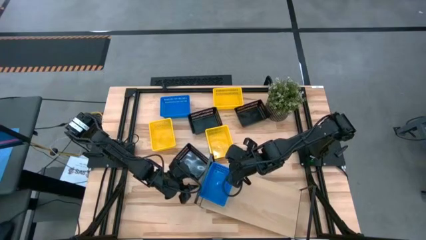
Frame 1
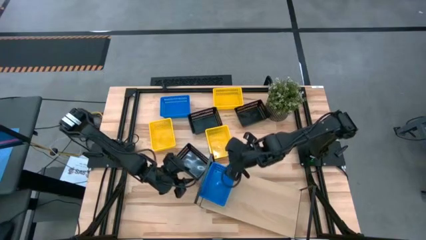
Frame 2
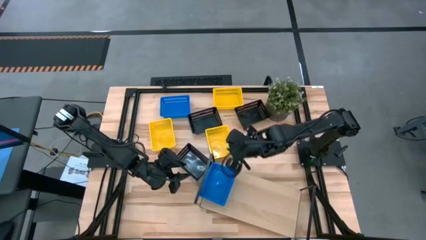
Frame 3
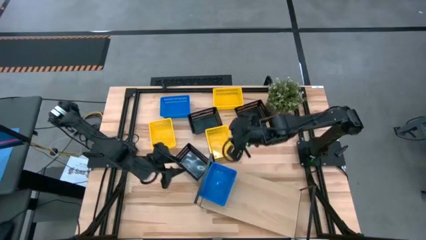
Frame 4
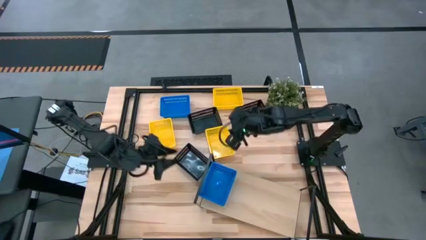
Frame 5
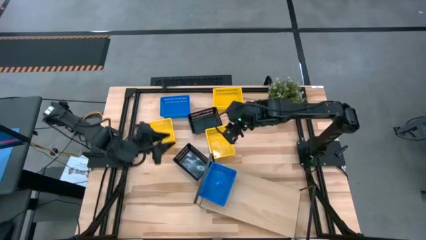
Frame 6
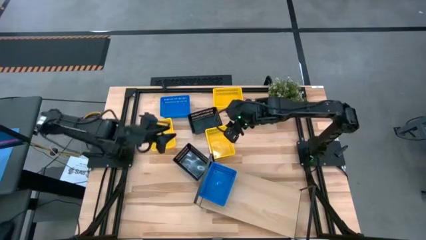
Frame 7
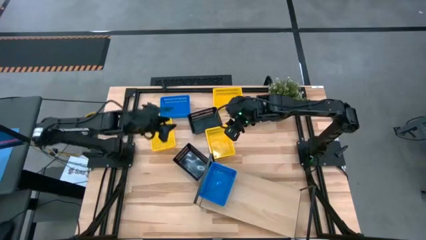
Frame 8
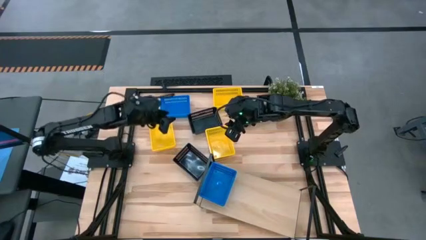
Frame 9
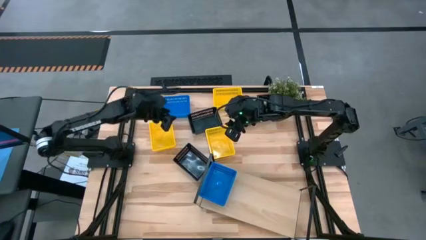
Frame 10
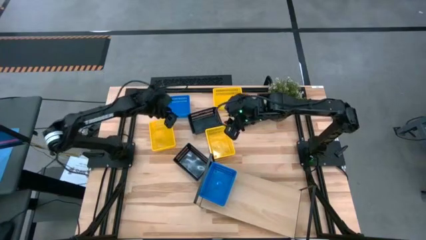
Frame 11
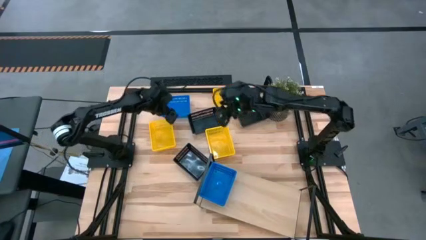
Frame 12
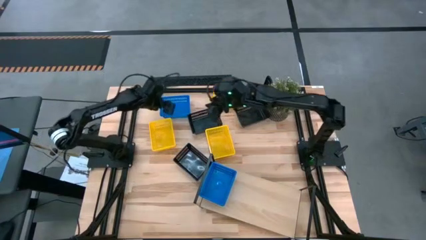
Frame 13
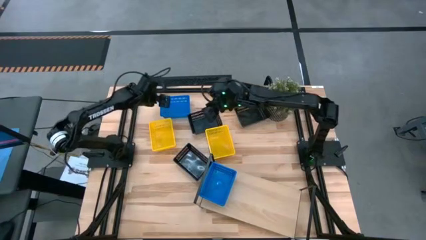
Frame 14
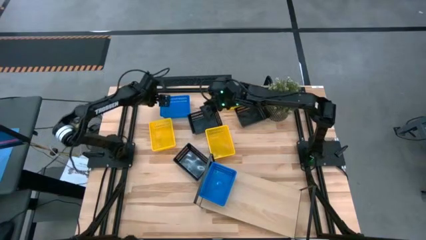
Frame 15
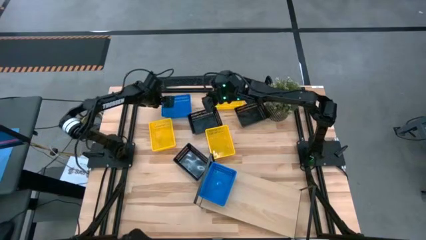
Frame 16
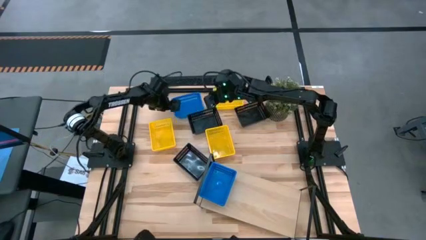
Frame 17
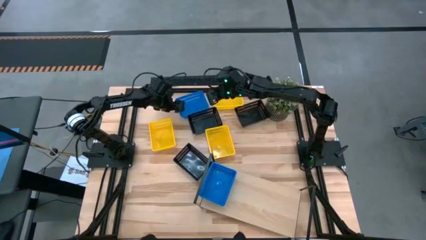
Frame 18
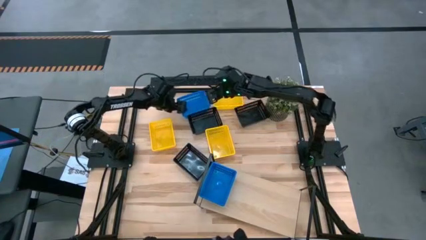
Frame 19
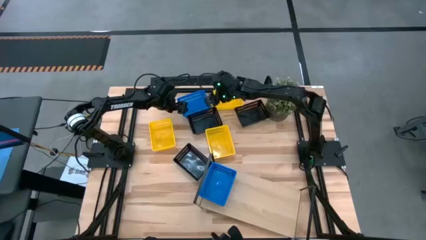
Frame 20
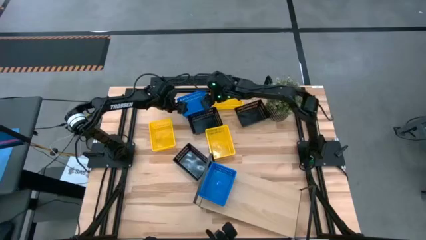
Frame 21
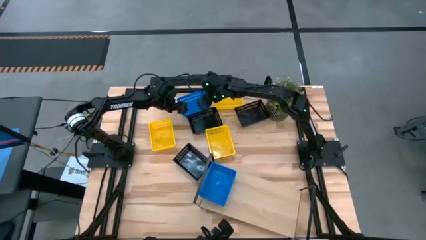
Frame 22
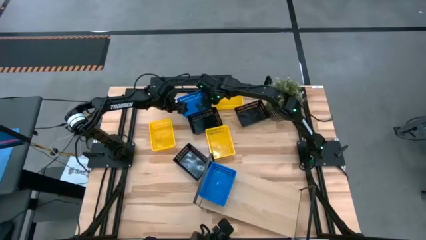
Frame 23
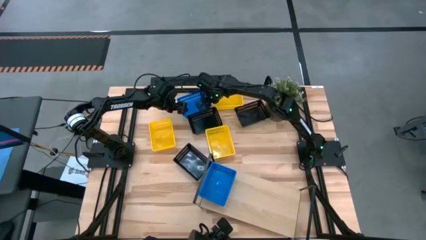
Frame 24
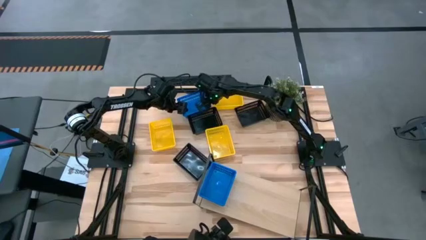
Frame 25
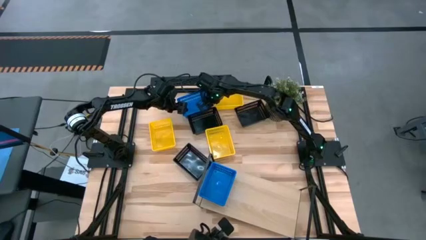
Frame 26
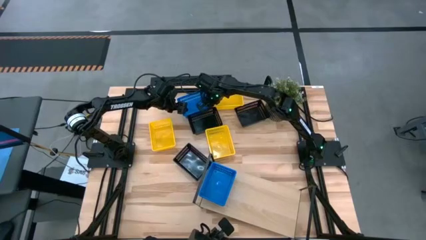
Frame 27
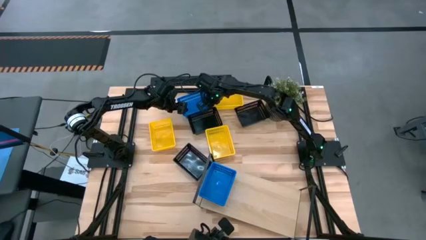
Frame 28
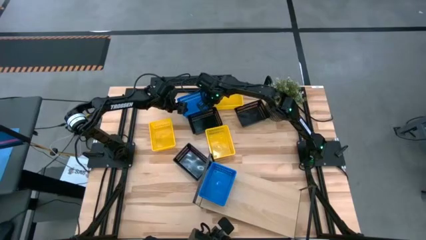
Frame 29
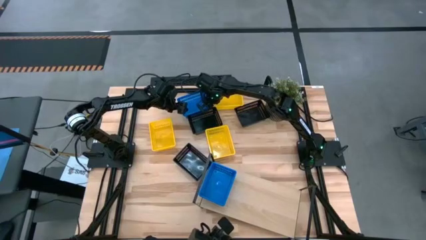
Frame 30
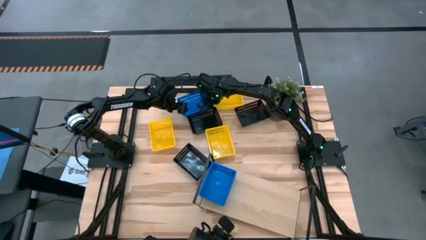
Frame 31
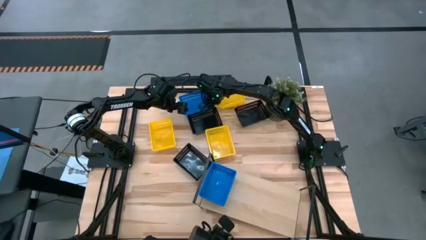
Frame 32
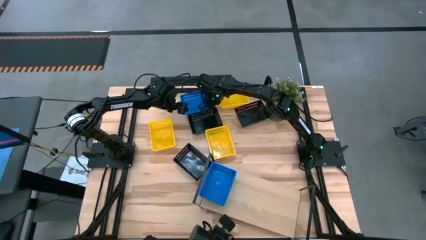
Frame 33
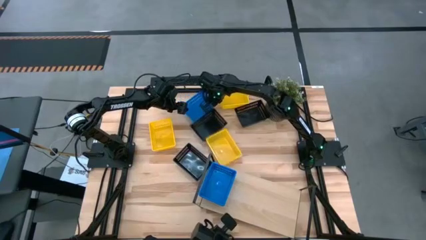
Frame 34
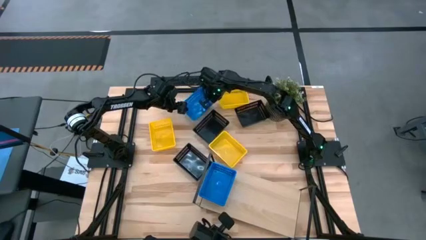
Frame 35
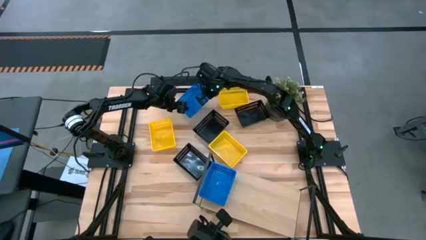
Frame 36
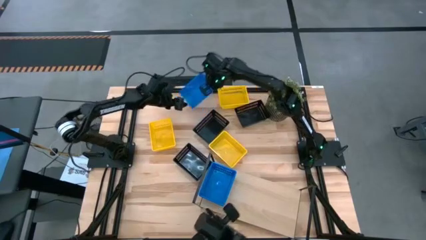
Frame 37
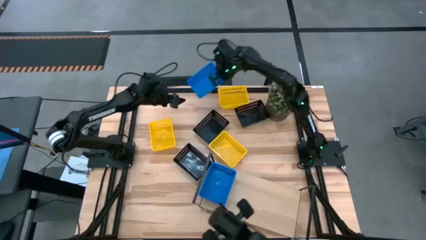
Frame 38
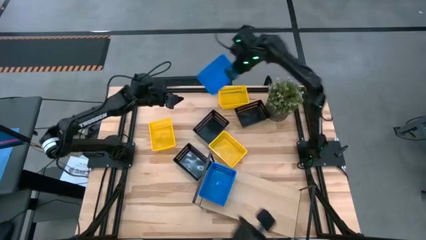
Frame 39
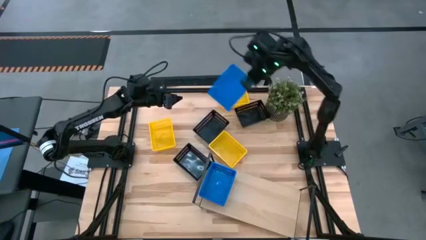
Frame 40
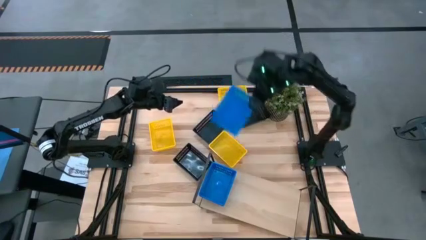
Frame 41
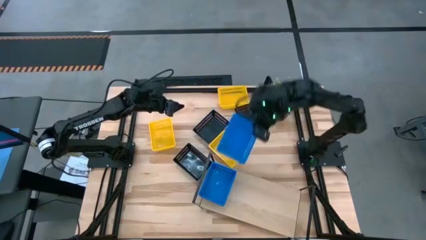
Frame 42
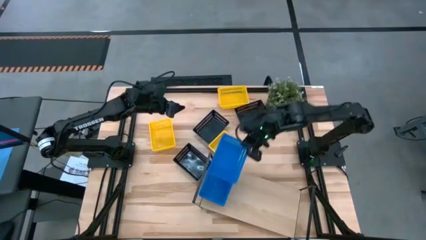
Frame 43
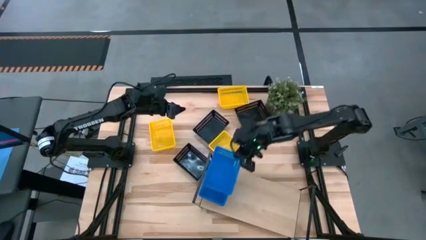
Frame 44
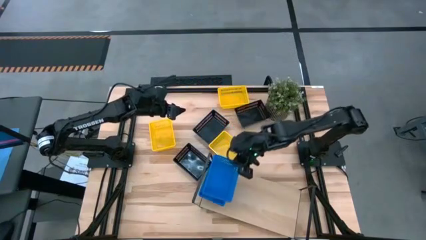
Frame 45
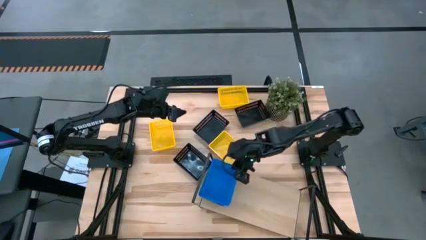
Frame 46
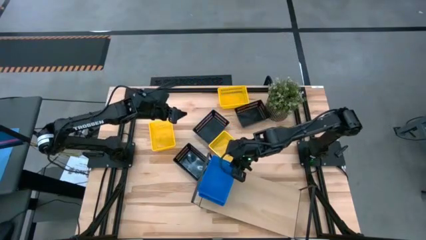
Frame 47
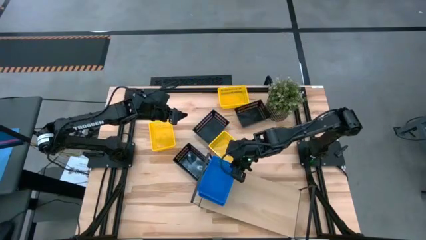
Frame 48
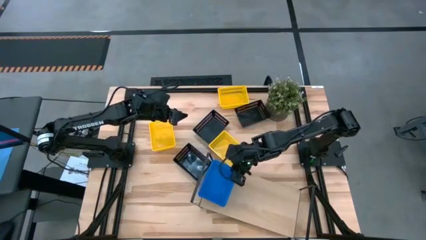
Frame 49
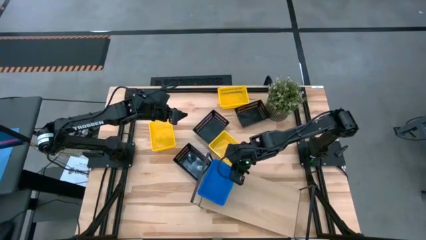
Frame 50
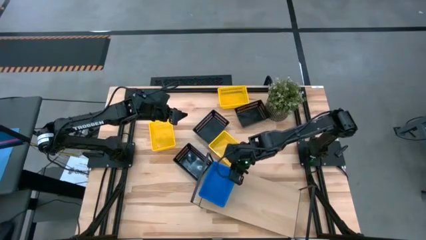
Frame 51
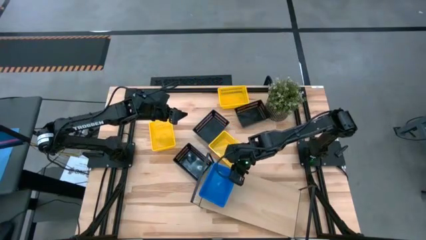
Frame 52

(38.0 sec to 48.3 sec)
Task: Stack baskets on shelf by color
Stack the blue bin on top of the blue bin on the shelf

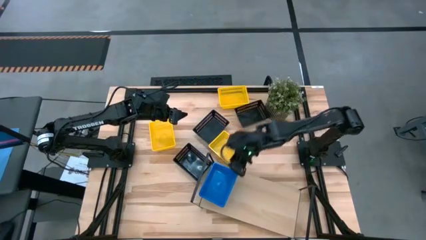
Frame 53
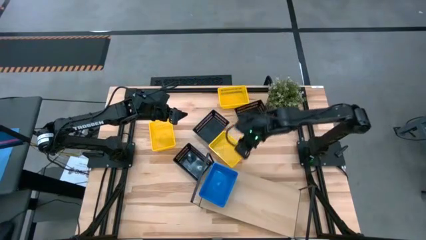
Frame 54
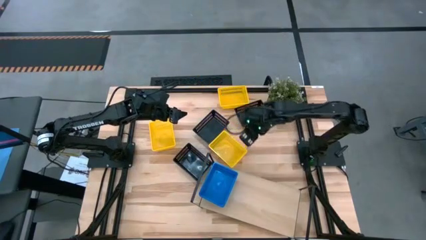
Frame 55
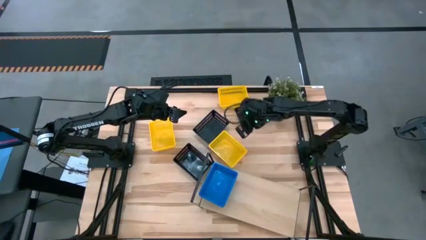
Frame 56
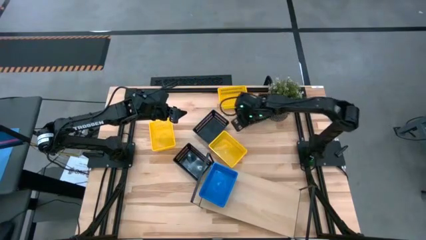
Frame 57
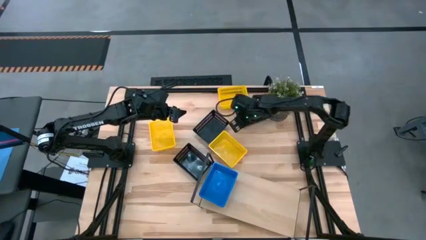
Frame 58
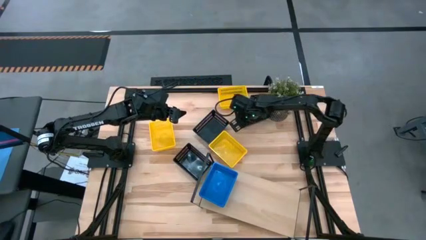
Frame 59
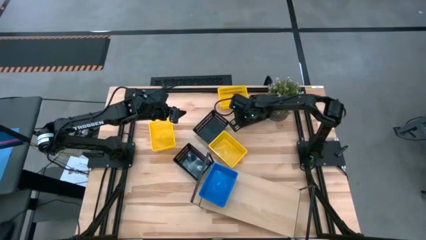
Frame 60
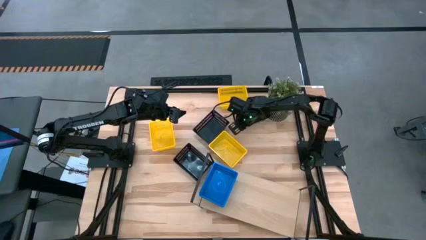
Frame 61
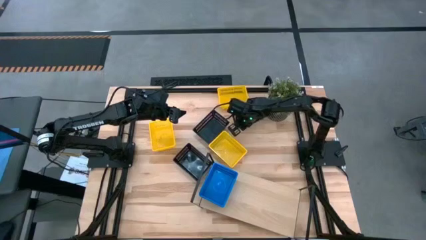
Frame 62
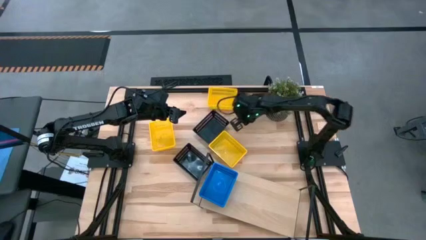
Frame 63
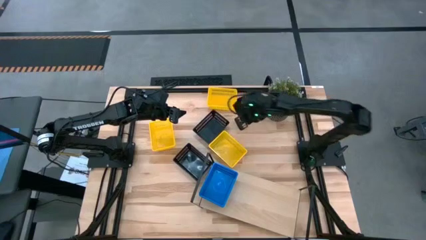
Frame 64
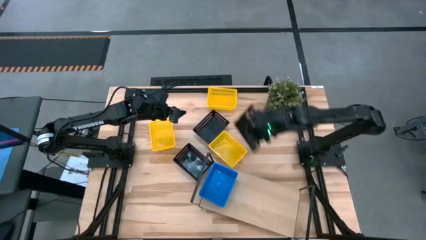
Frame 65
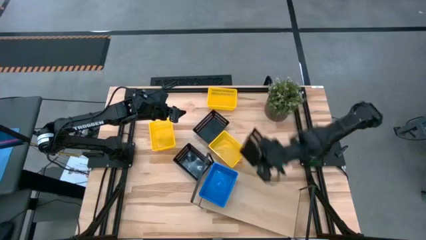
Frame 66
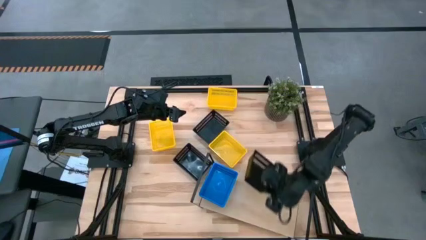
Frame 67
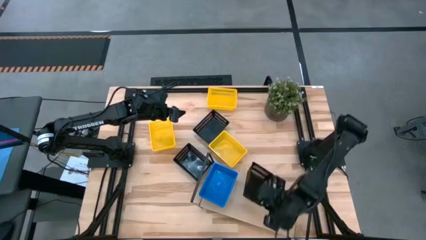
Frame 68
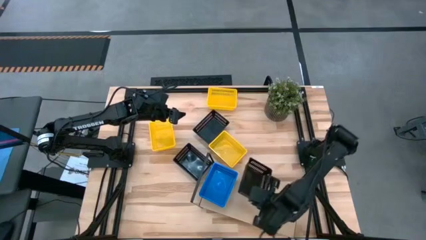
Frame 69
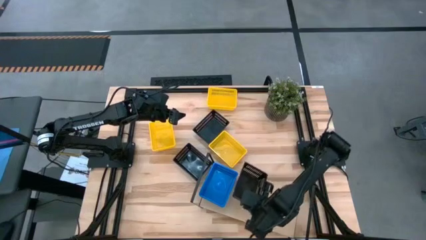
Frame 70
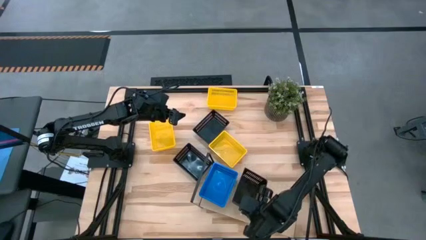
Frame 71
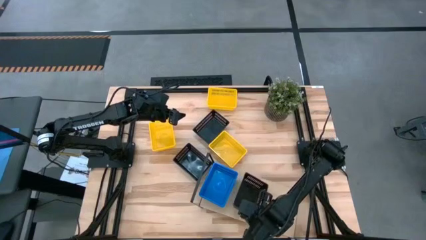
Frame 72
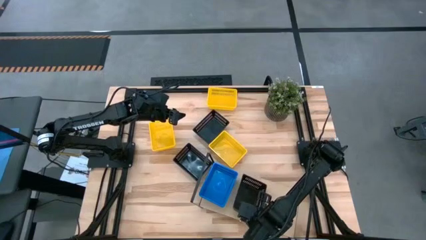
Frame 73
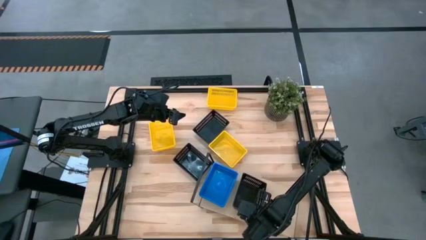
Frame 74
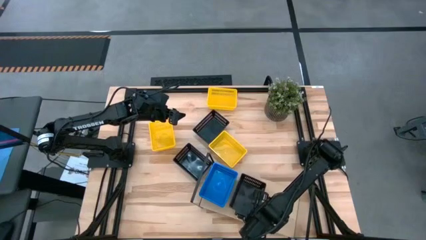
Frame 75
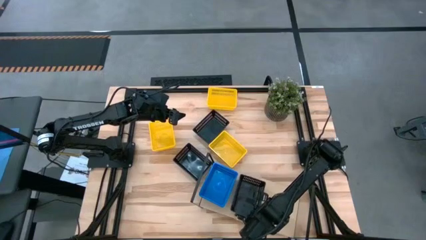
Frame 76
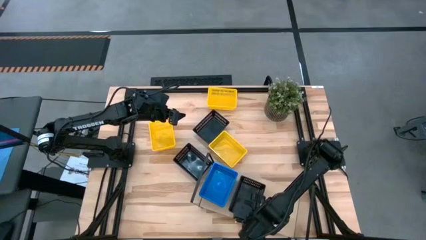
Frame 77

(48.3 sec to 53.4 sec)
Put the top right black bin on the shelf

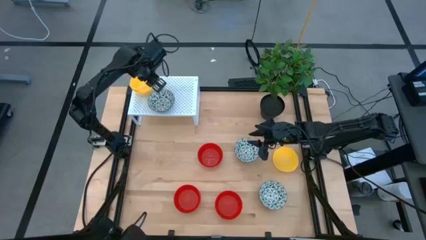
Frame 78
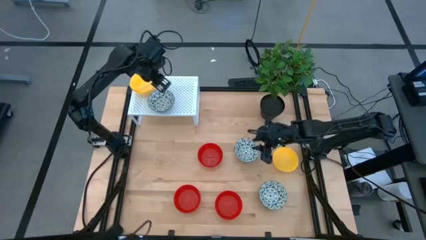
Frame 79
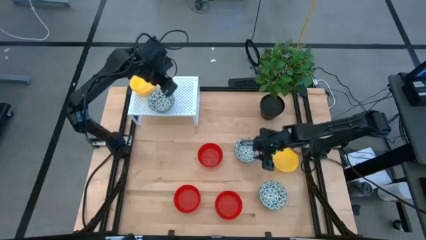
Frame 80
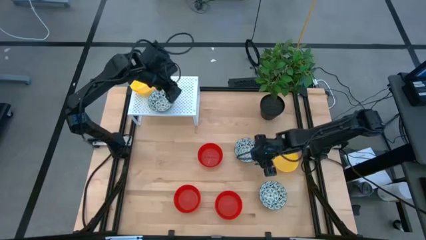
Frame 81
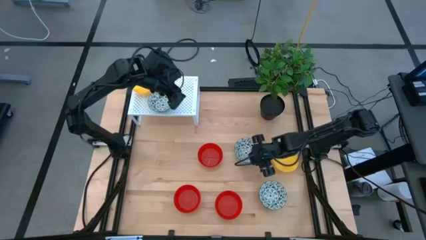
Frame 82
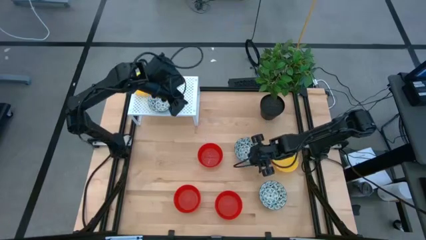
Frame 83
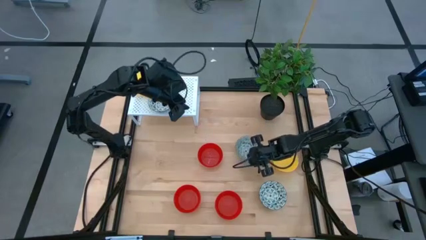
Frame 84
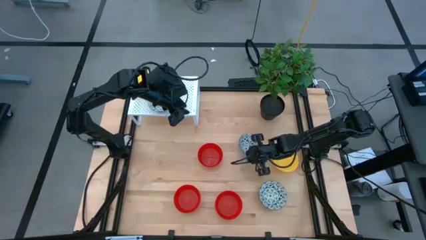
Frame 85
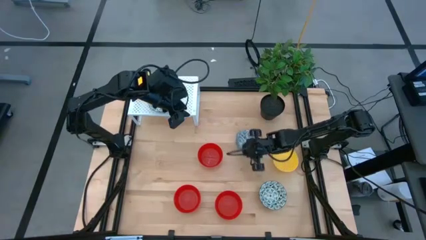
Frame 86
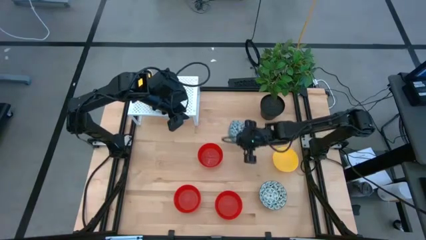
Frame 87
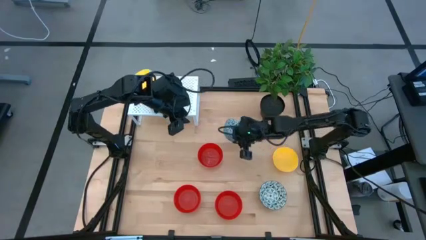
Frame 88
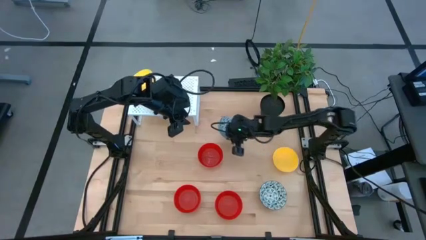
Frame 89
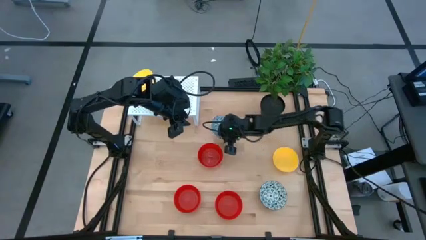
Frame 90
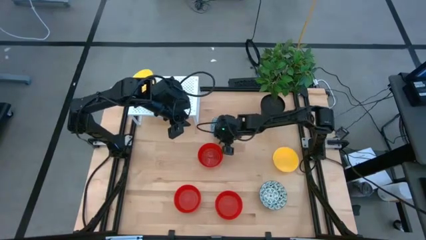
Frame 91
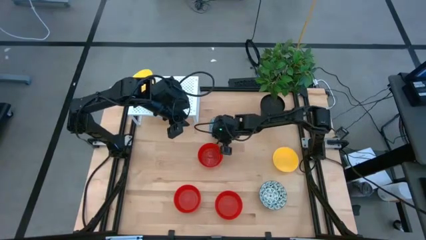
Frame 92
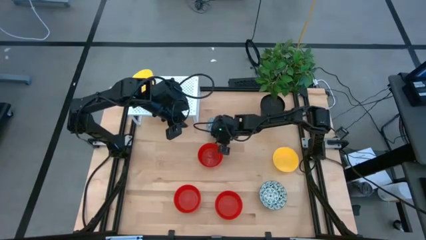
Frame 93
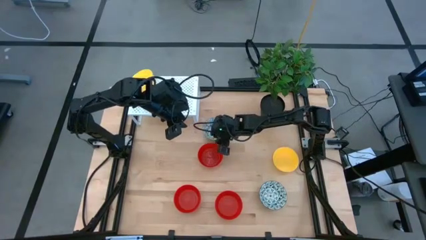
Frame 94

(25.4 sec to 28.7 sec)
Task: Pick & Place Mini bowls
Move the green patterned bowl to the top center of the table
